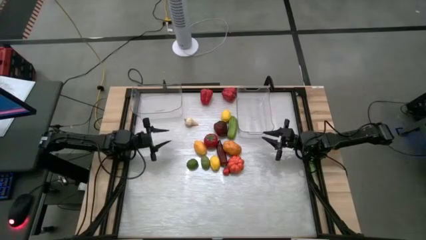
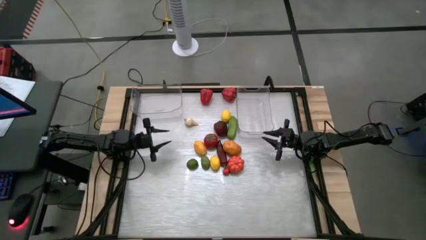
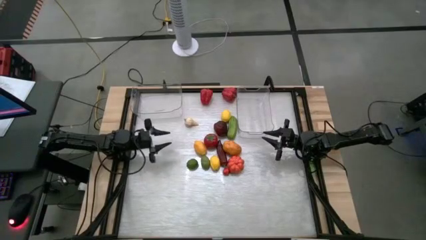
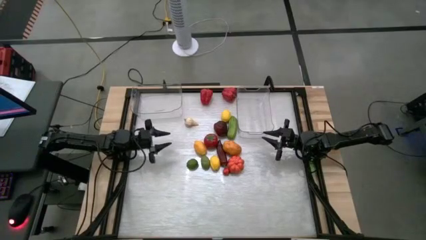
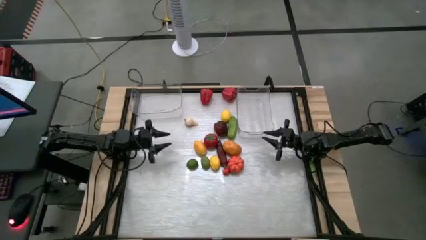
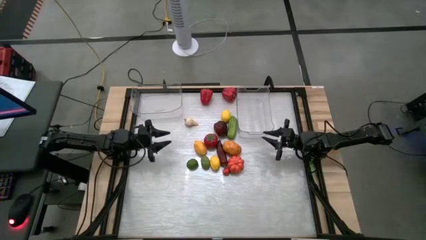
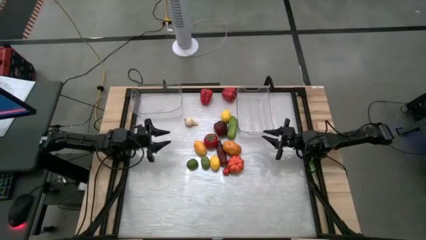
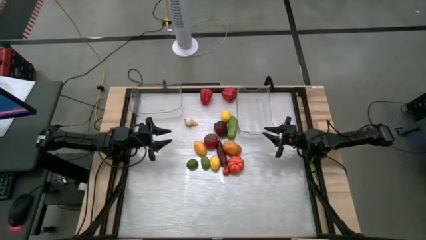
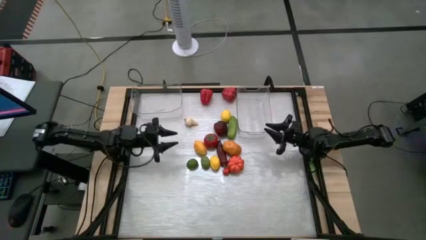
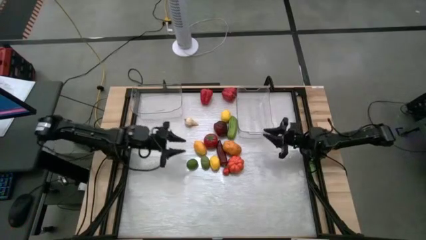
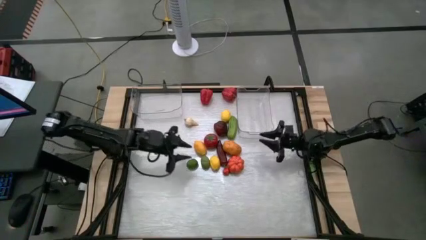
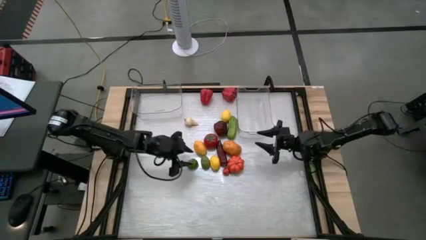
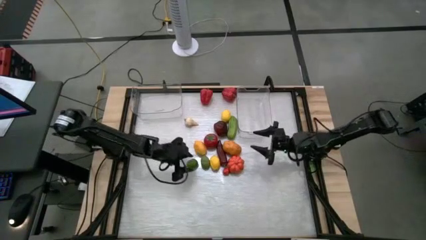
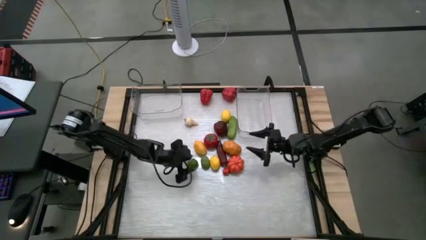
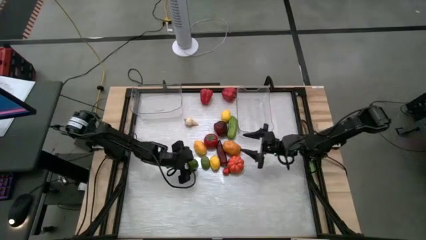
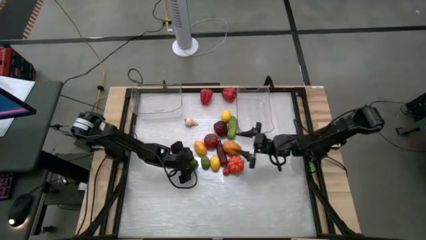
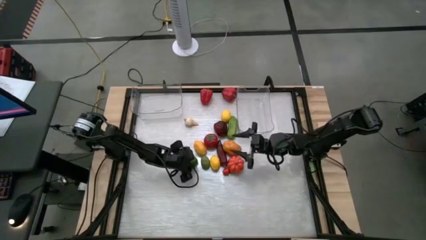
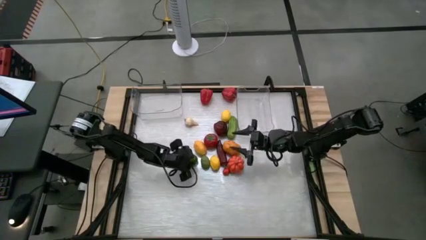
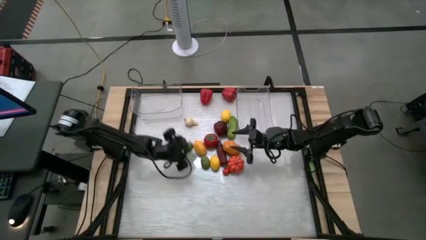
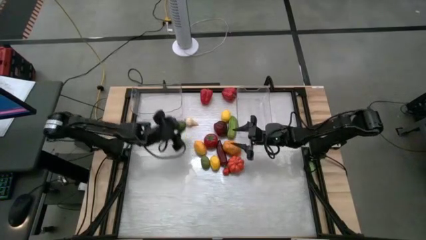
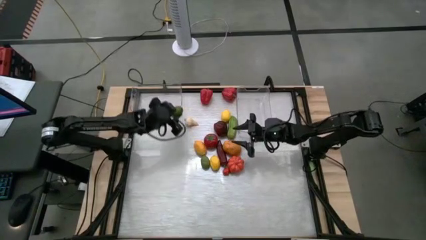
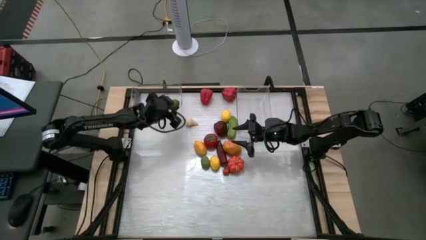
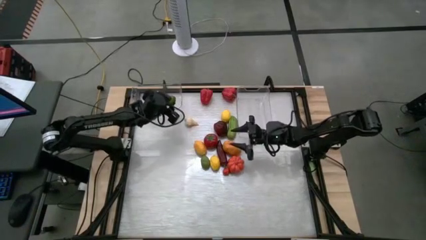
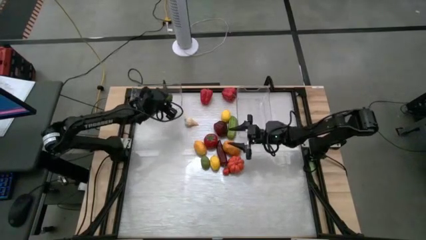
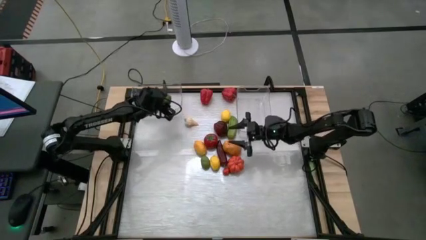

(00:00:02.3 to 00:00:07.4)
Task: Sort produce into baskets
Put the left green lime into the left transparent bin

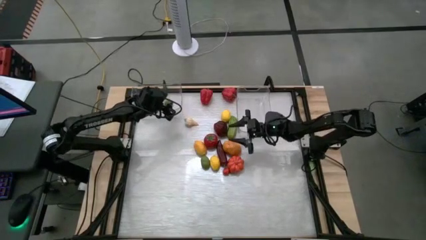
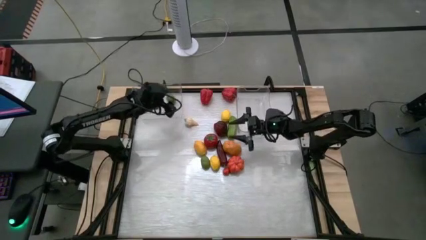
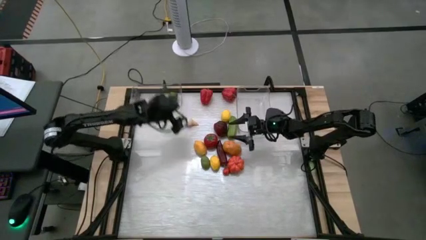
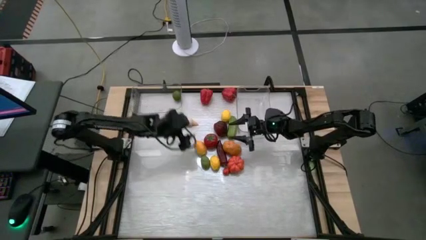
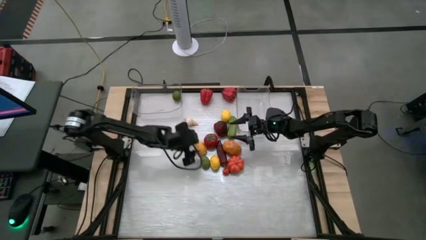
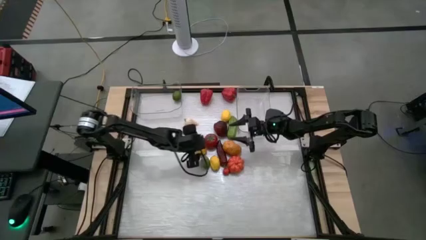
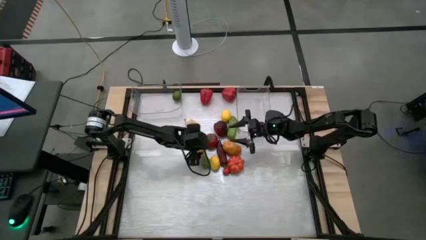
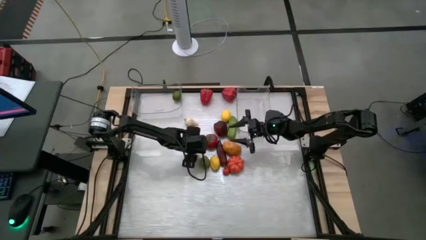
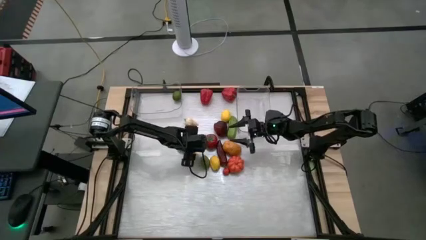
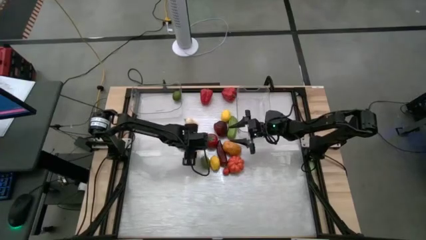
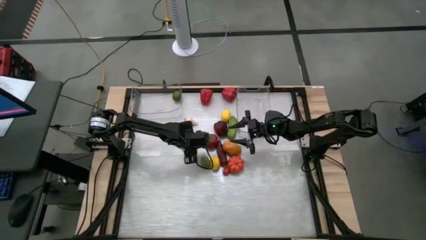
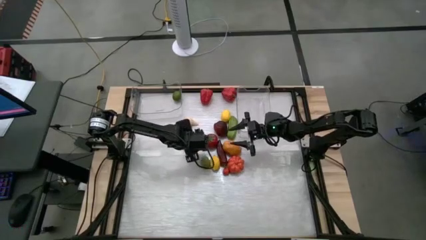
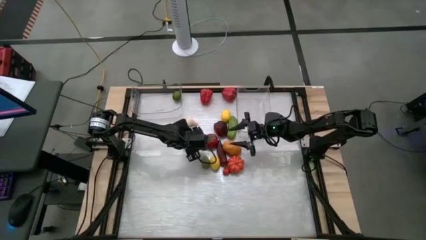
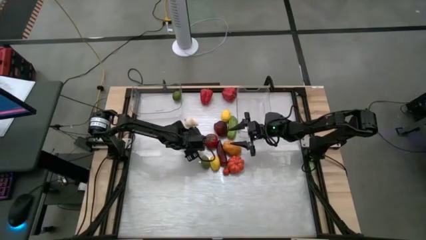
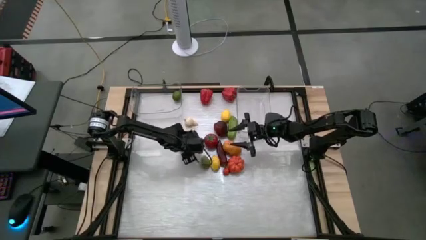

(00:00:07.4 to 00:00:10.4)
Put the middle left yellow lemon into the left transparent bin

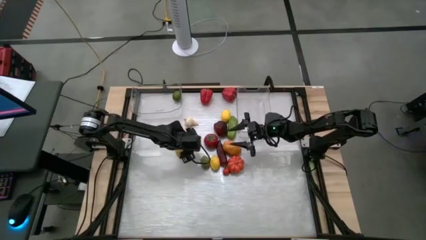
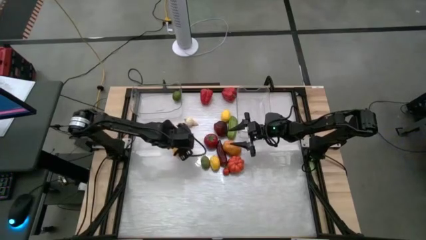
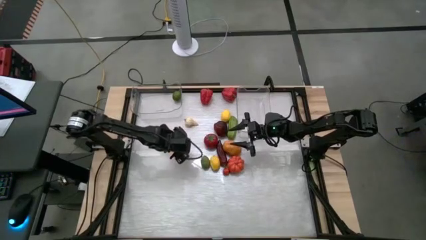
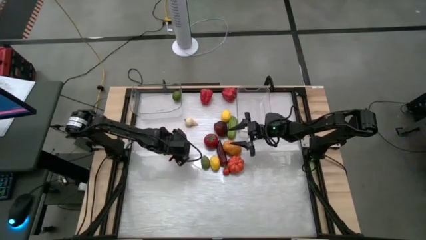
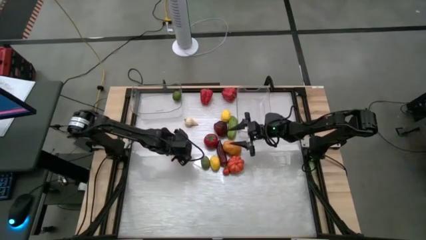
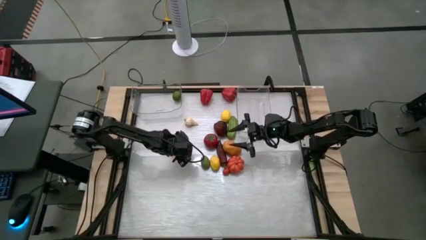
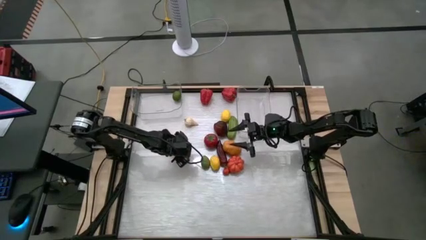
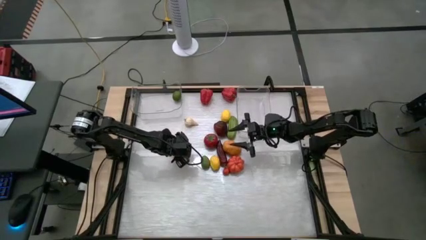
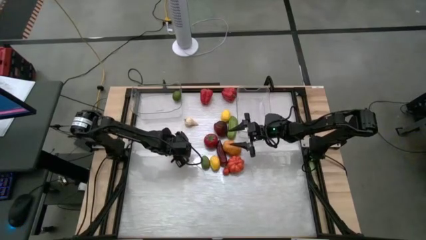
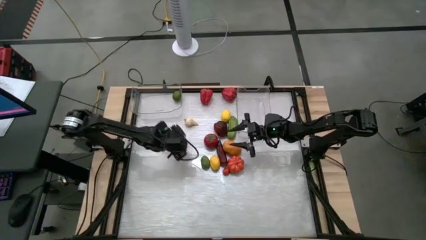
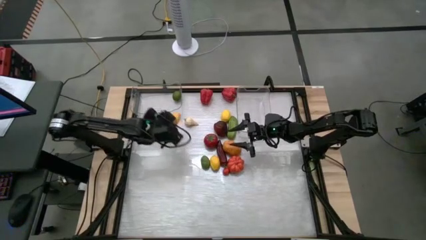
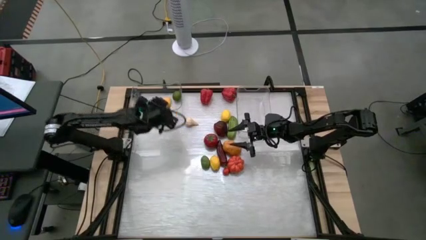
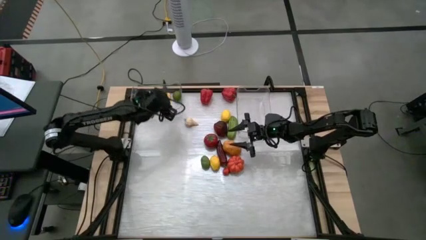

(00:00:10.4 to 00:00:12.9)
Put the middle left yellow lemon into the left transparent bin

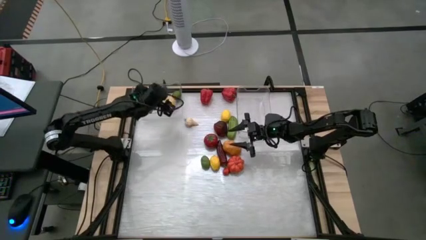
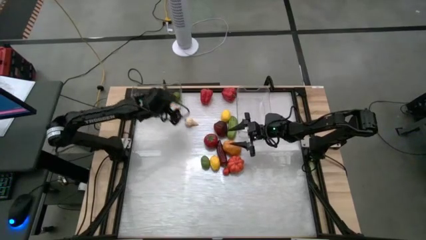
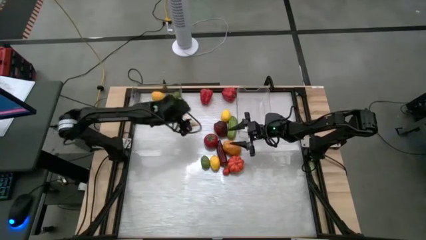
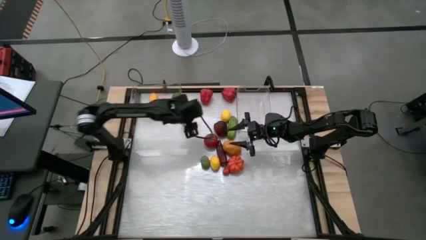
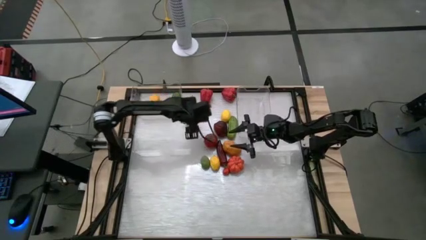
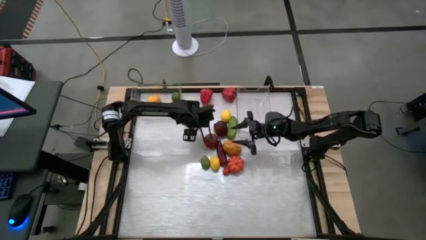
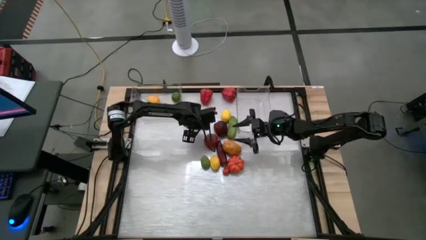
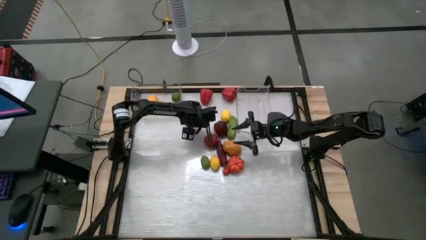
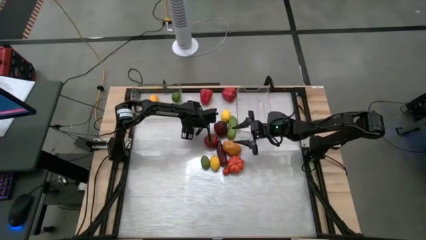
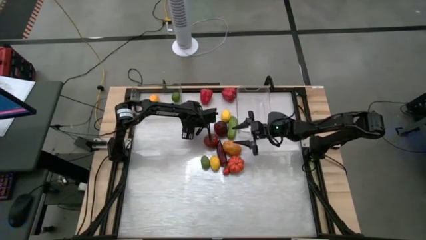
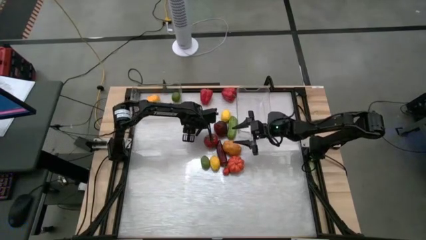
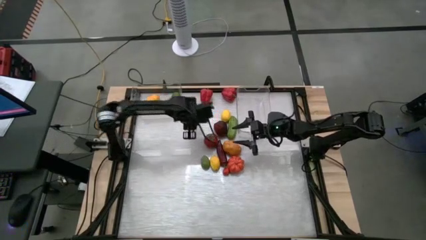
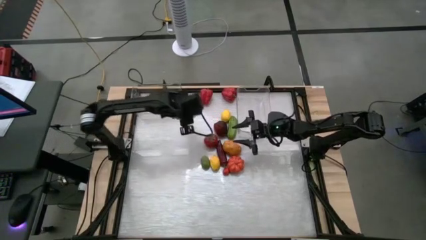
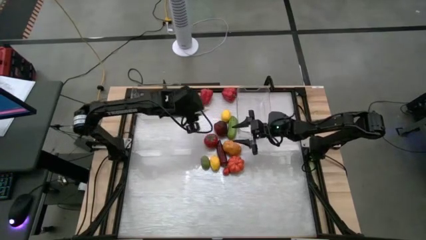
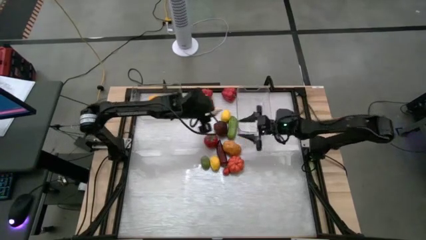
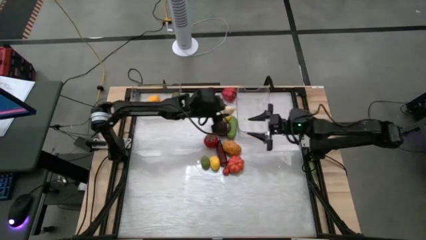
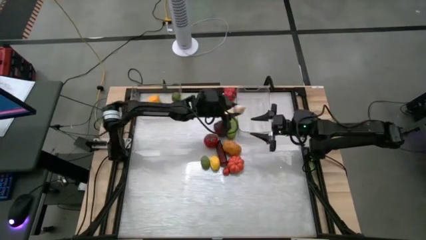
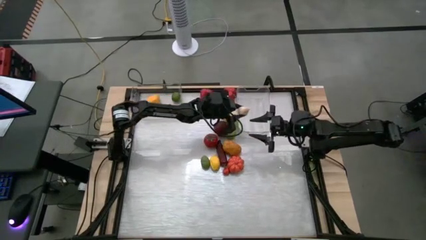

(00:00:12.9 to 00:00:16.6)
Put the white garlic into the right transparent bin

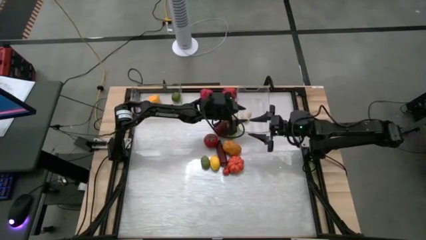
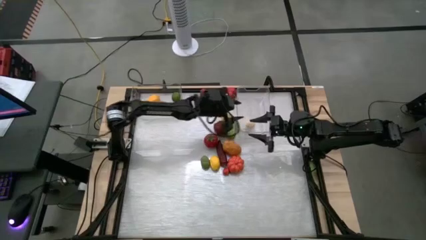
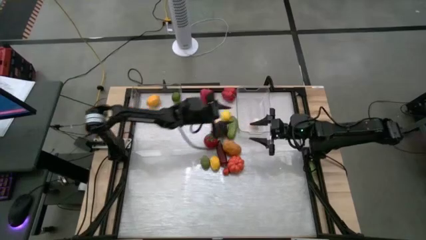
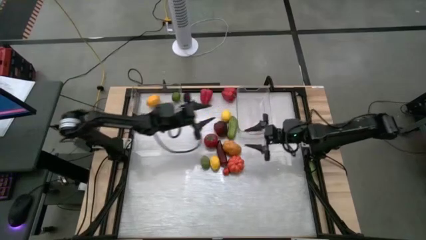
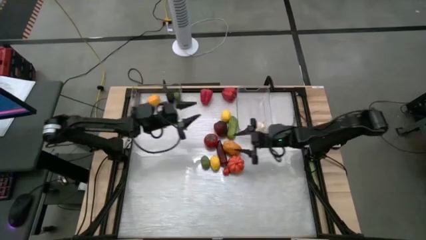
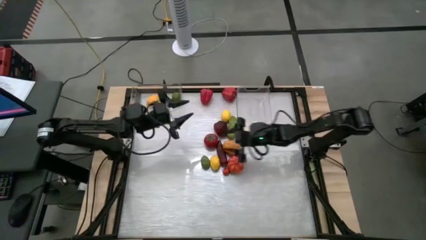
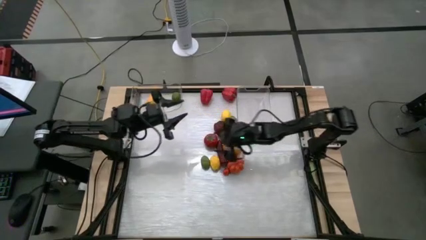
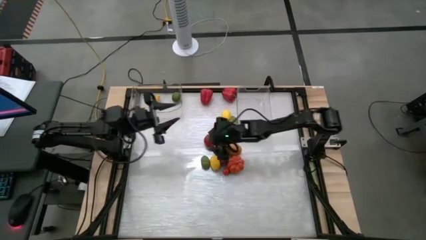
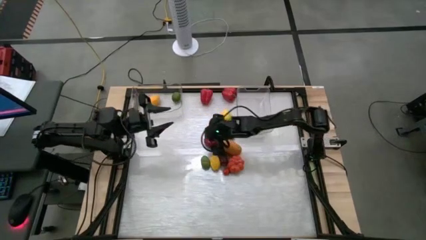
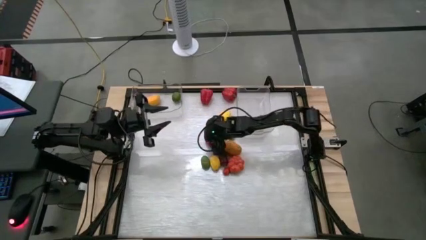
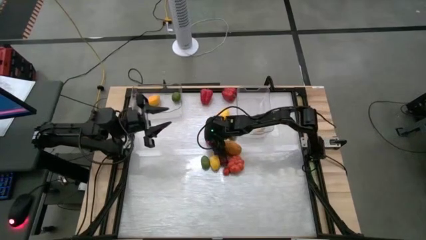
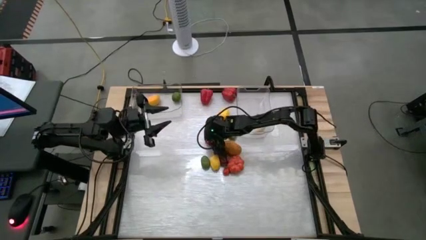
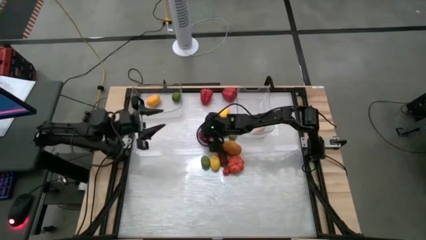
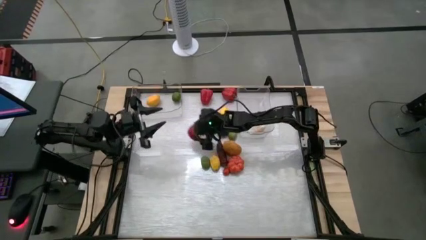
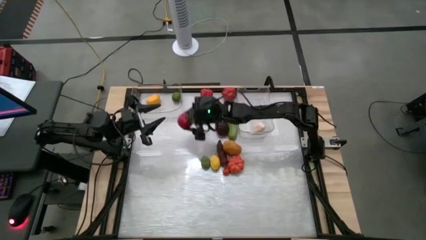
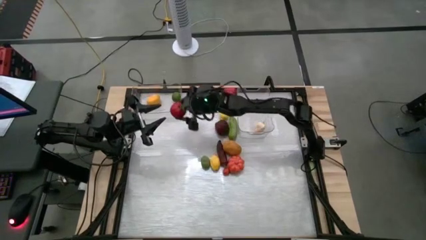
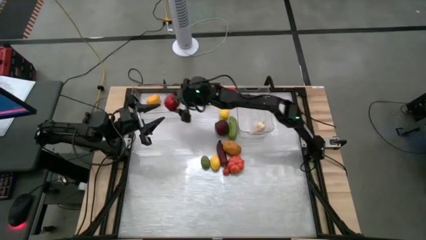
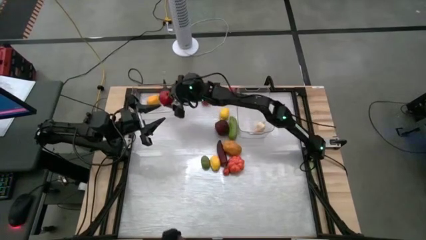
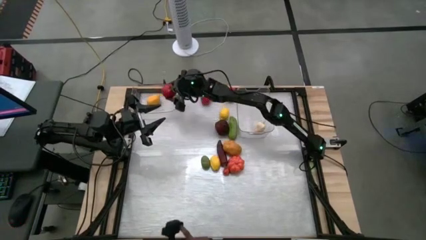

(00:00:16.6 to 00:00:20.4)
Put the top red tomato into the left transparent bin
